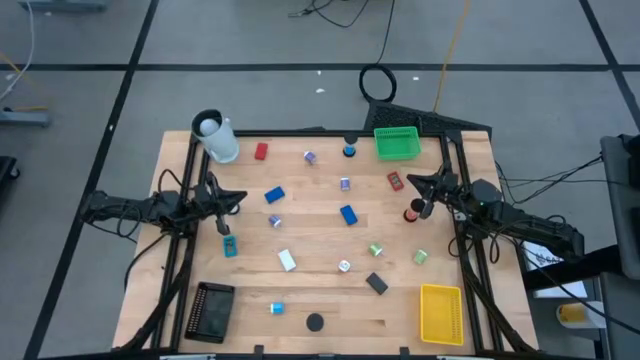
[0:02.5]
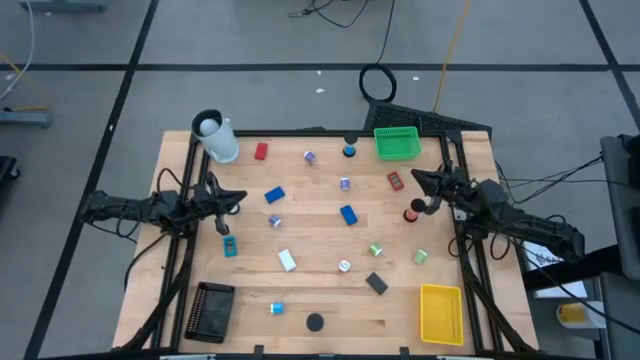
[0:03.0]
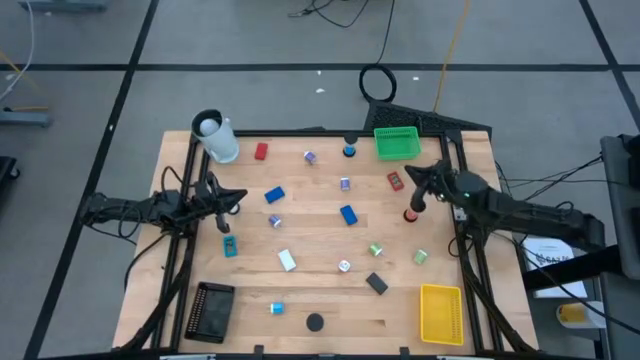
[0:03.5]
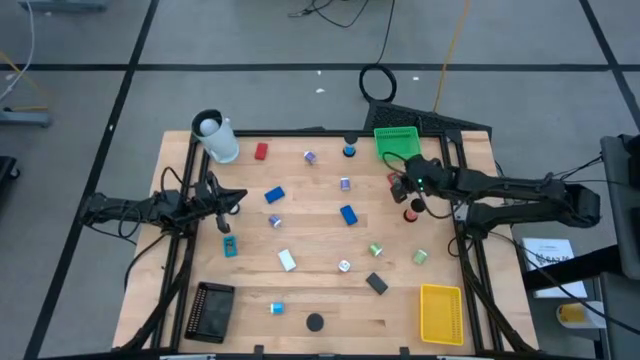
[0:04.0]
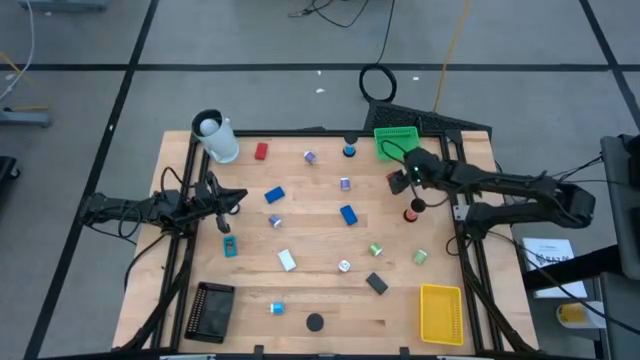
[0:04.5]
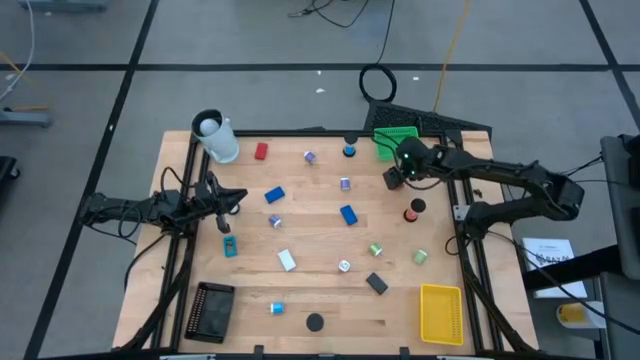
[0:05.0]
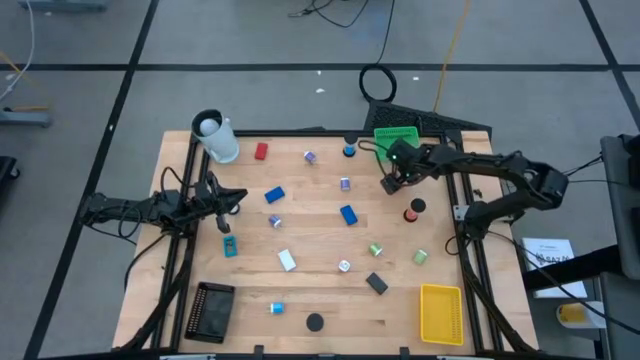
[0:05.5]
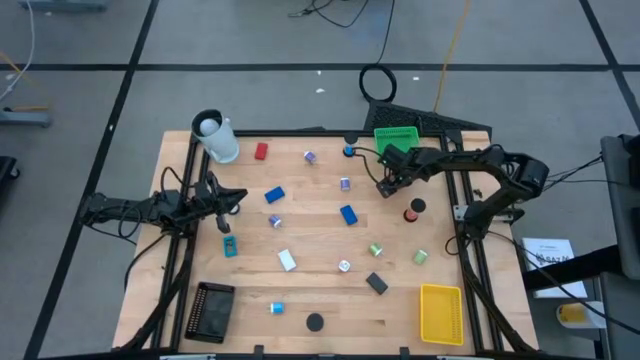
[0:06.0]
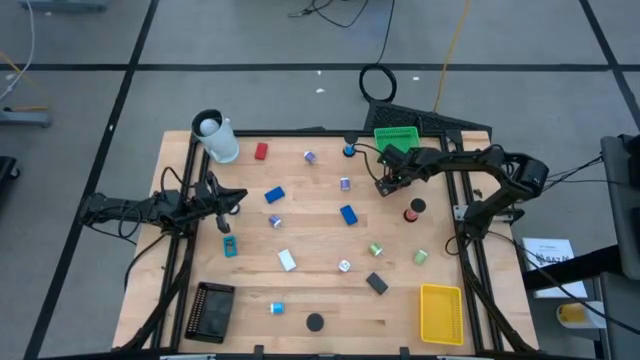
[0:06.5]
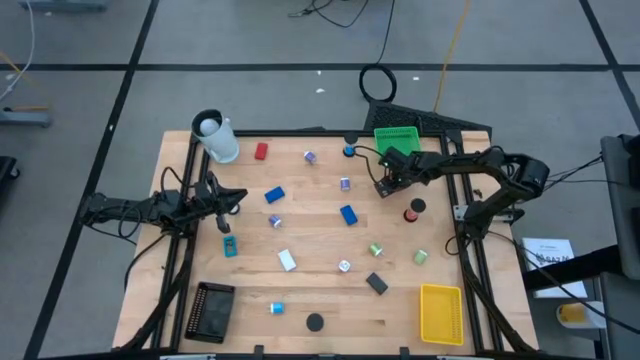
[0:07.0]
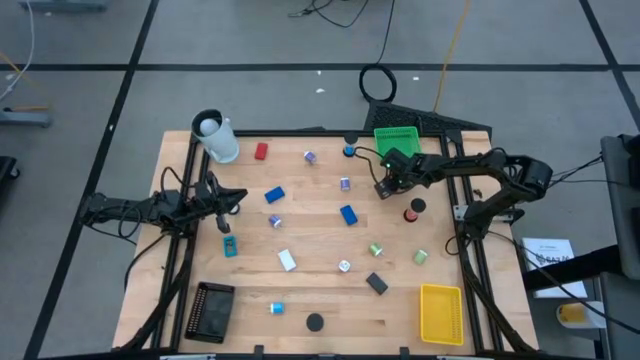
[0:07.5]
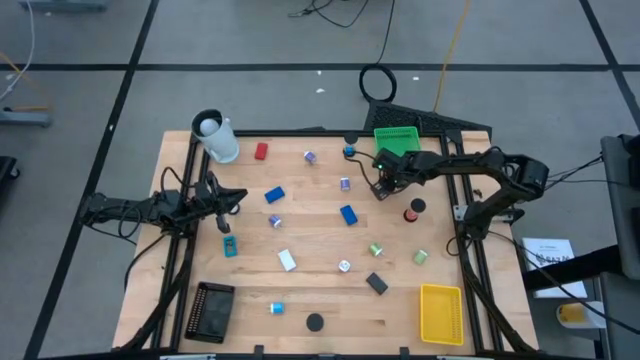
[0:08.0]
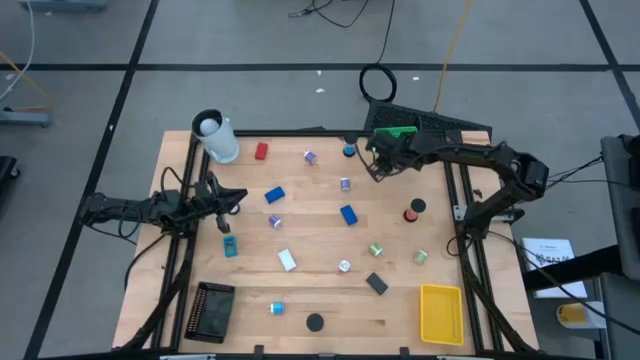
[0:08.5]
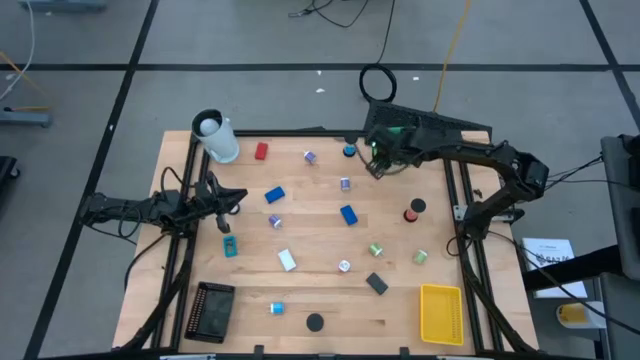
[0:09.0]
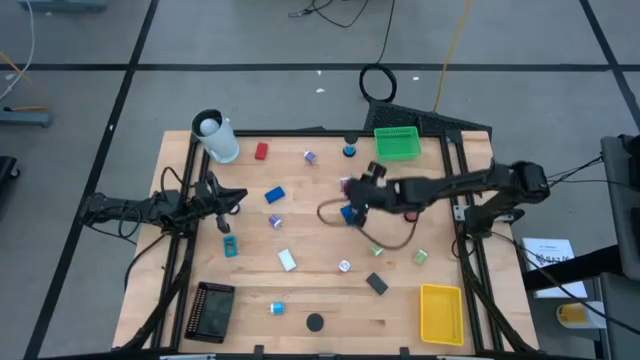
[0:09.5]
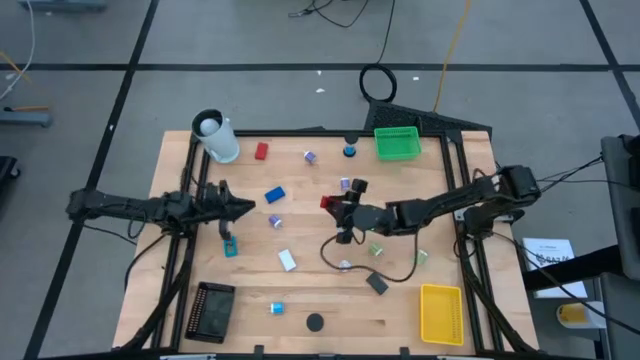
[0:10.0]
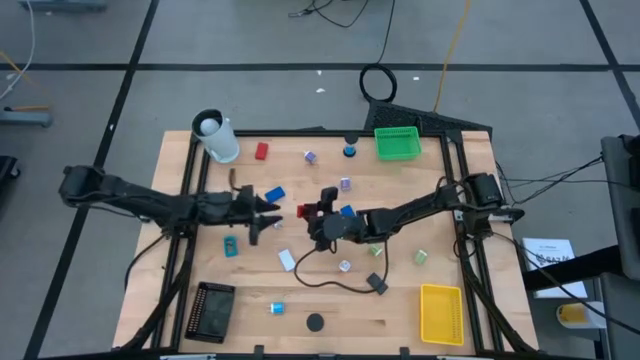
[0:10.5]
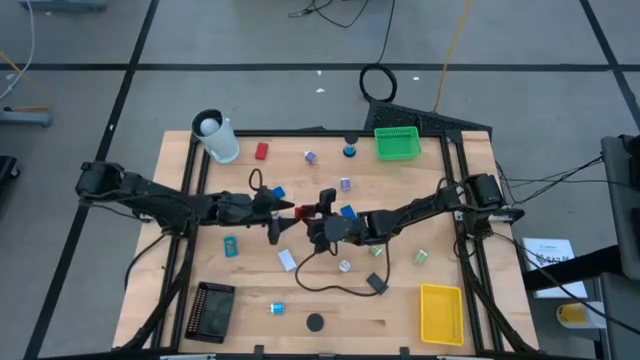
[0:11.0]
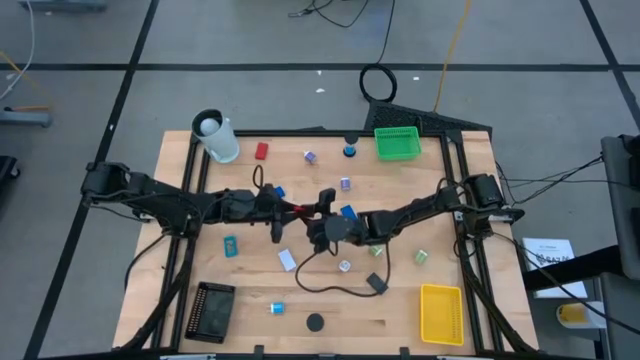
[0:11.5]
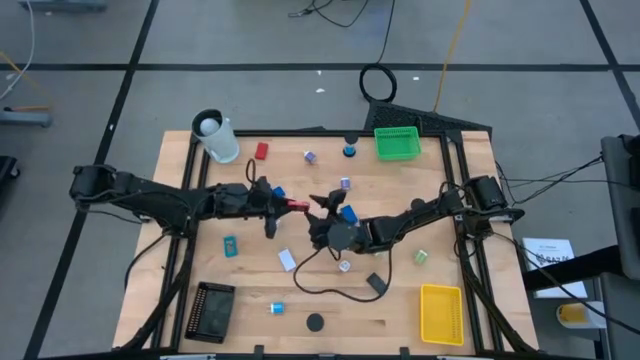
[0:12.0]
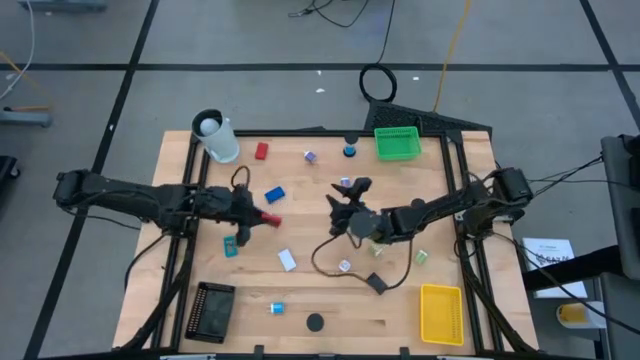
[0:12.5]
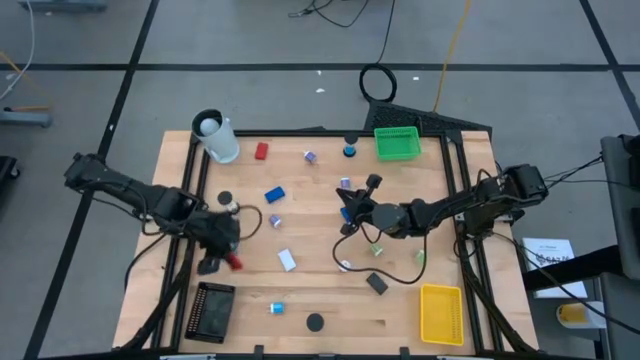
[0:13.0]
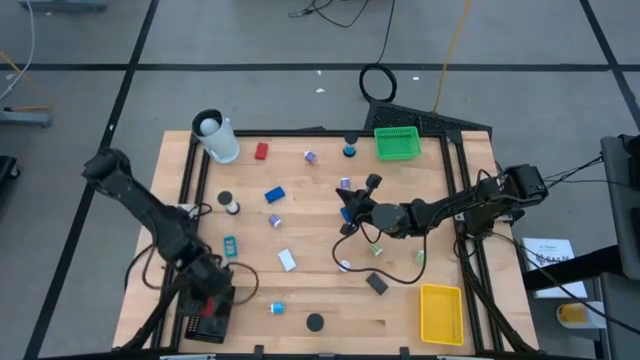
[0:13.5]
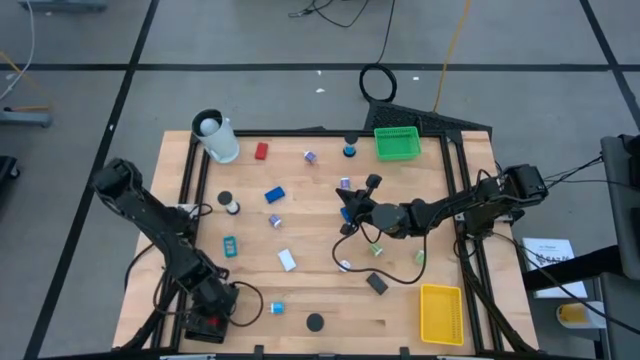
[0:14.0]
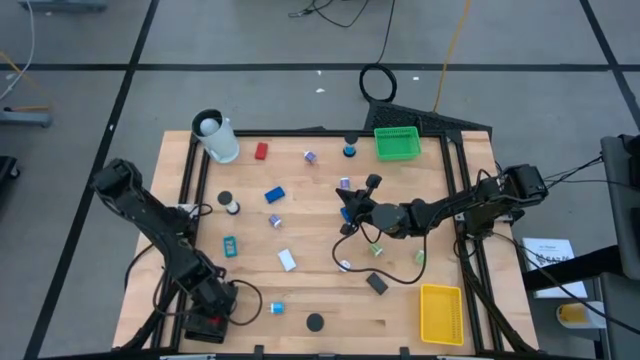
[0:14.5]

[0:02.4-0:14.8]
Task: Pick & Place Office items
Put the right red digital clock into the black bin

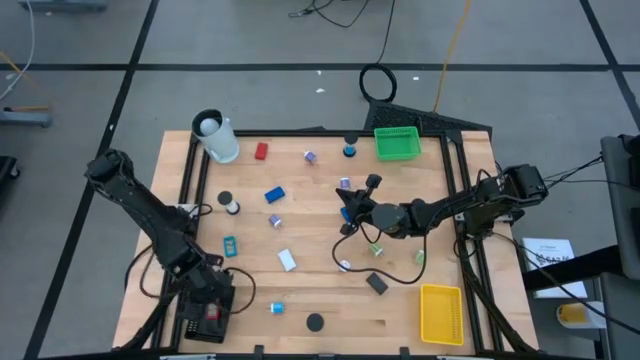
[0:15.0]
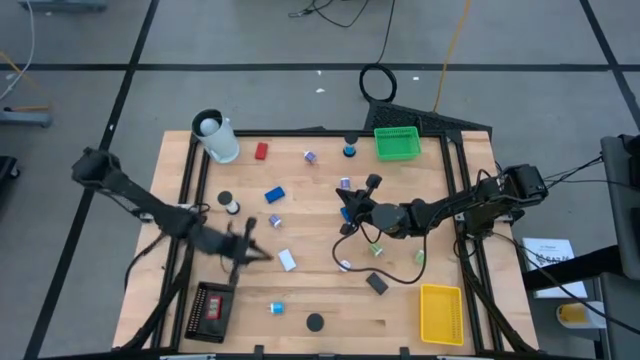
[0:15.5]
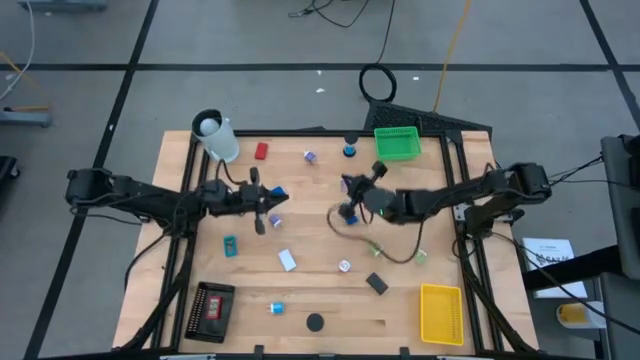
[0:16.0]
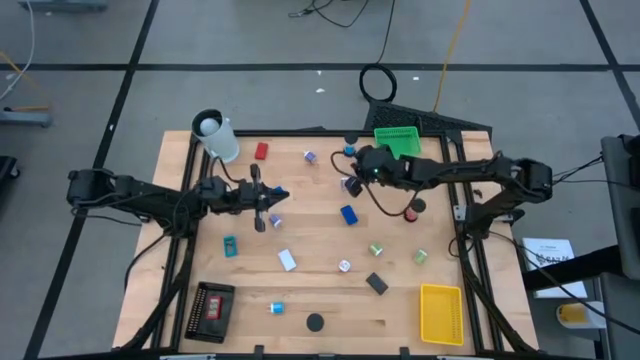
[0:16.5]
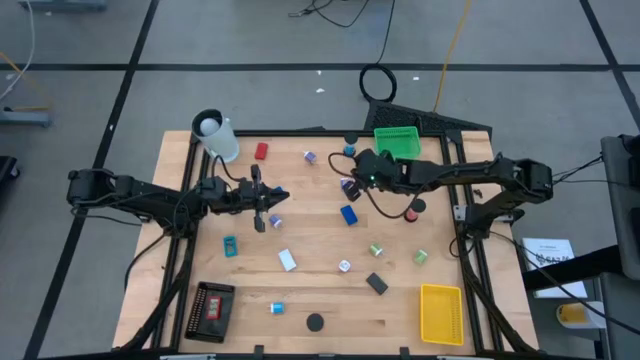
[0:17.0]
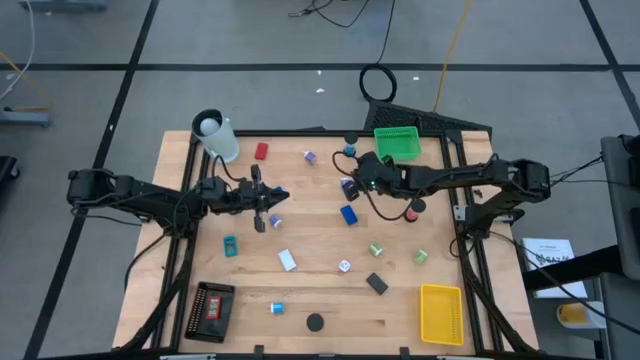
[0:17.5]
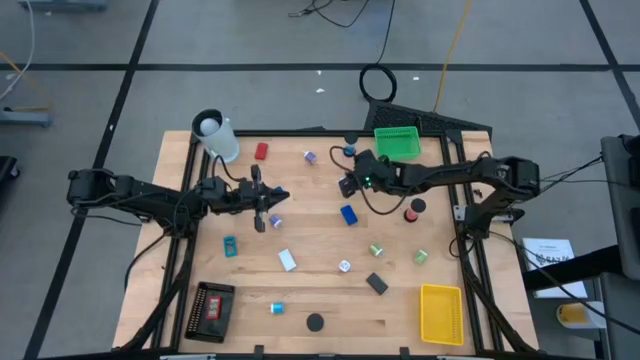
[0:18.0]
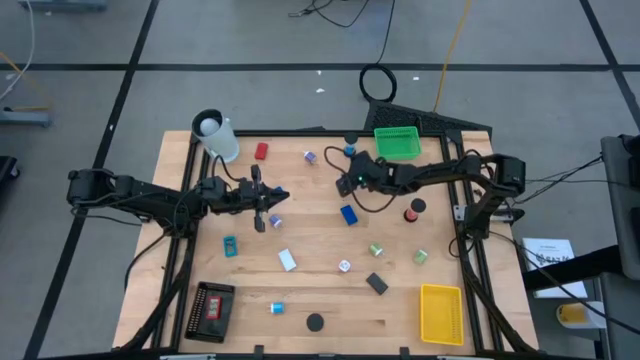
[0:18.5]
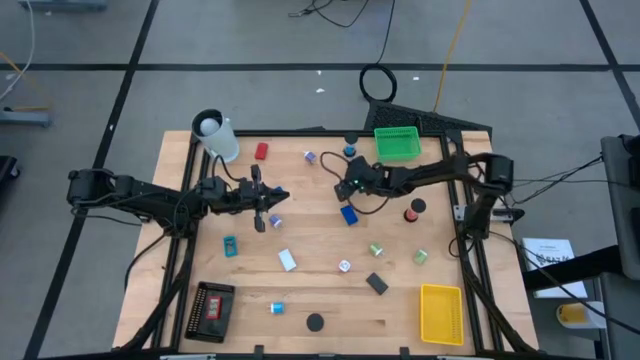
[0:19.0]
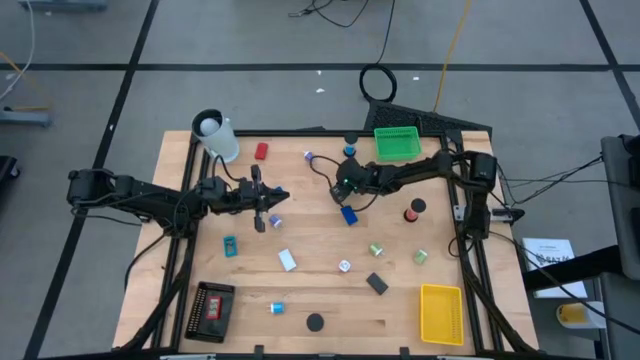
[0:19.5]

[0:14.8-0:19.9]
Put the middle purple charger adapter into the yellow bin

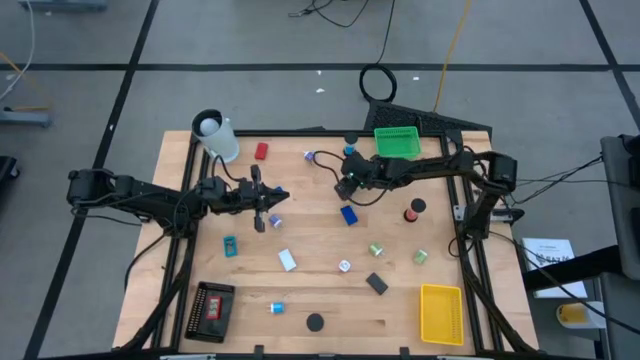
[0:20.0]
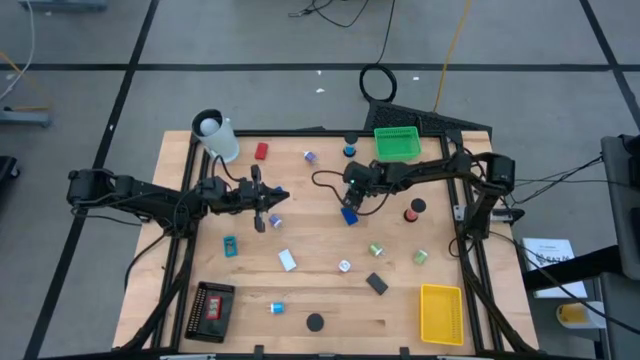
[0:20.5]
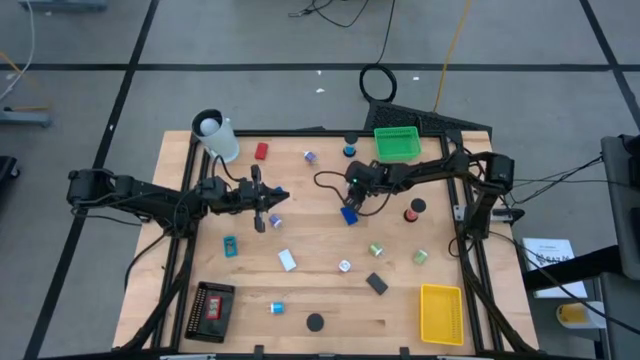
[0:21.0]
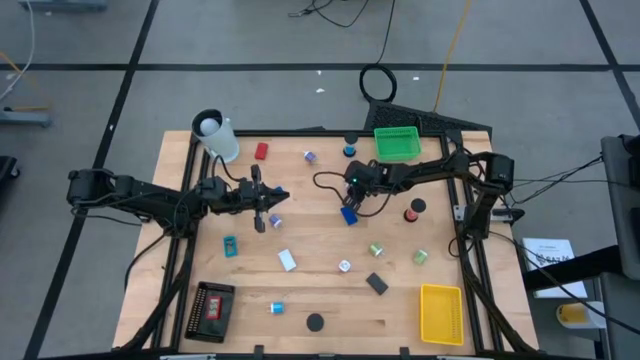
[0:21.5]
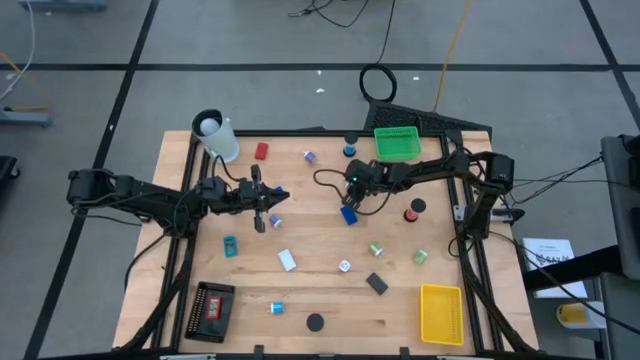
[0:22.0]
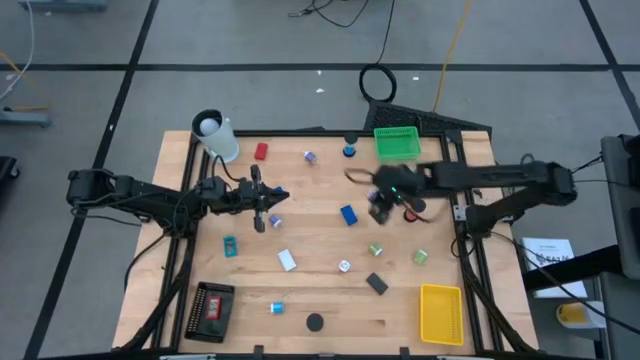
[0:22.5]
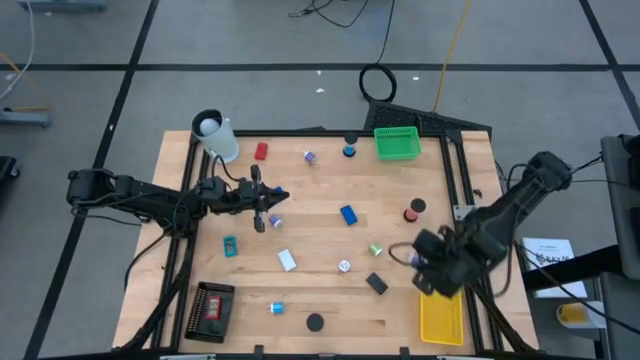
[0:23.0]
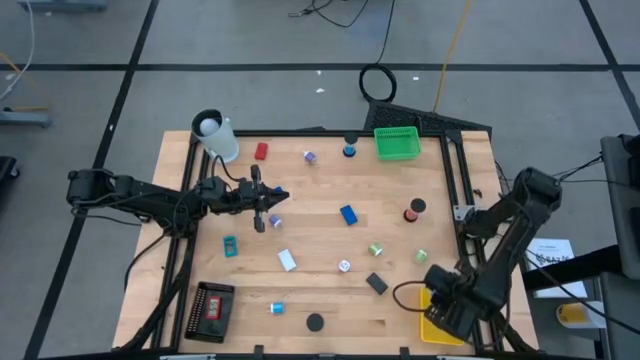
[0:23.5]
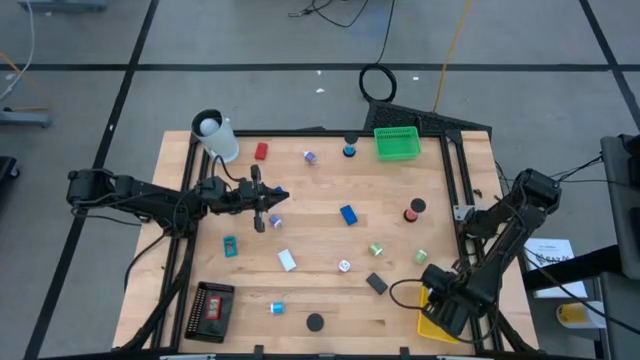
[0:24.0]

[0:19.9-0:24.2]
Put the middle purple charger adapter into the yellow bin
